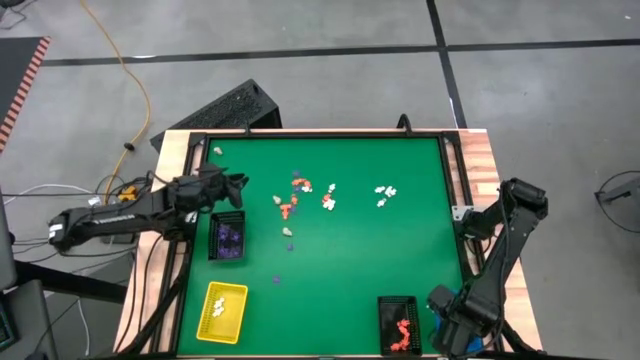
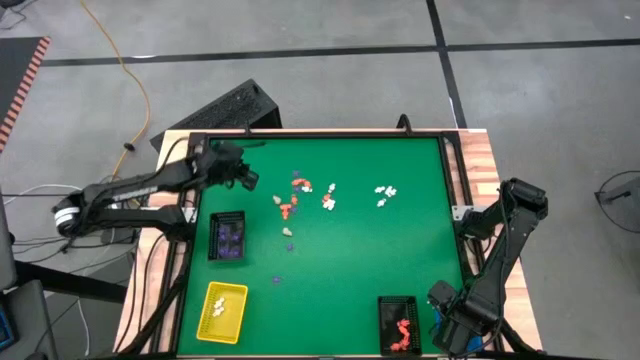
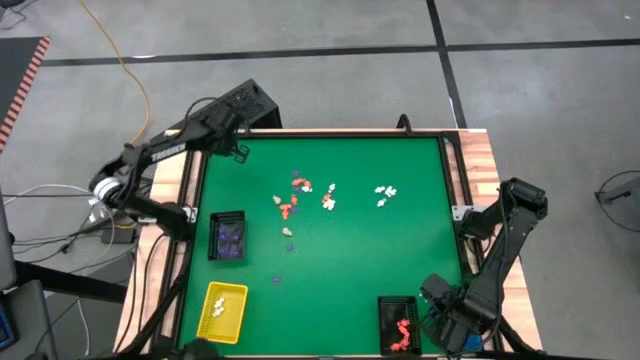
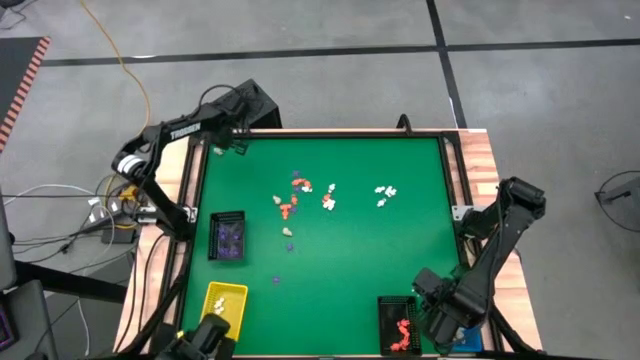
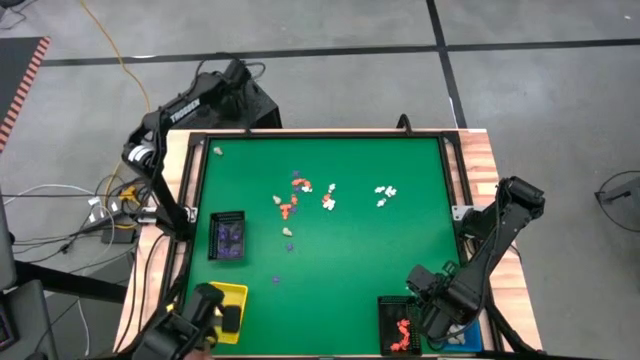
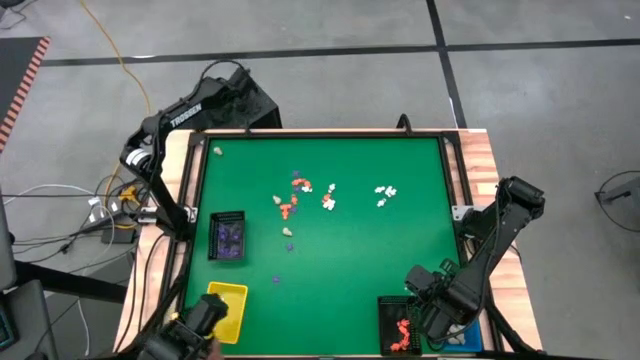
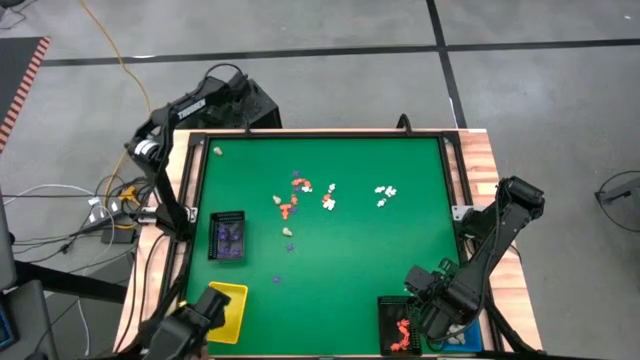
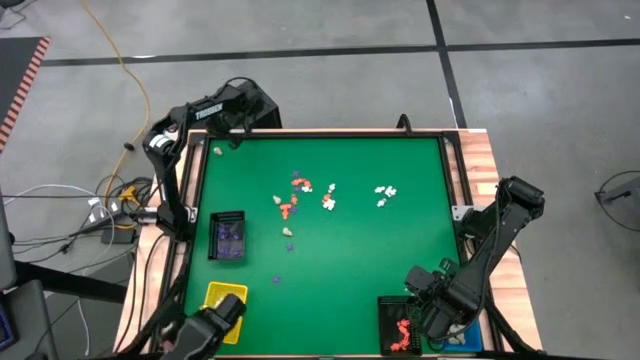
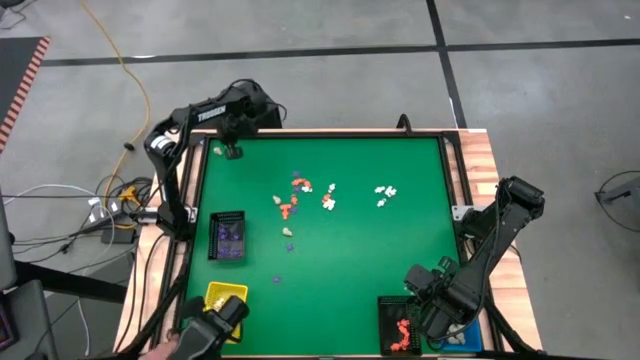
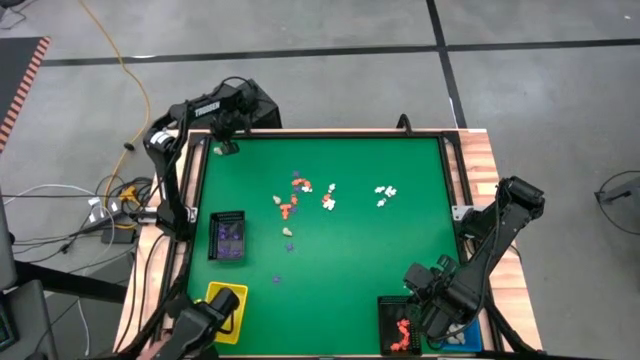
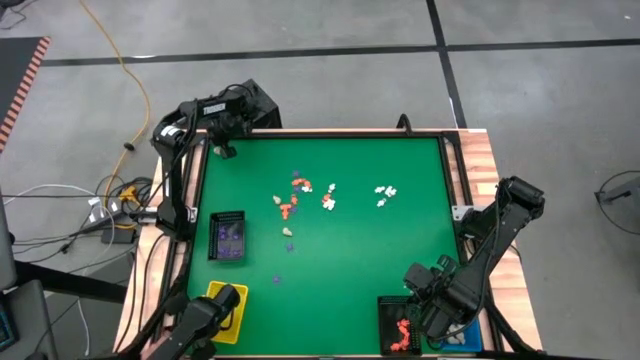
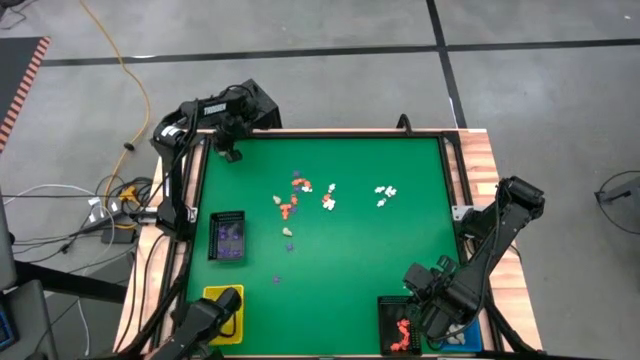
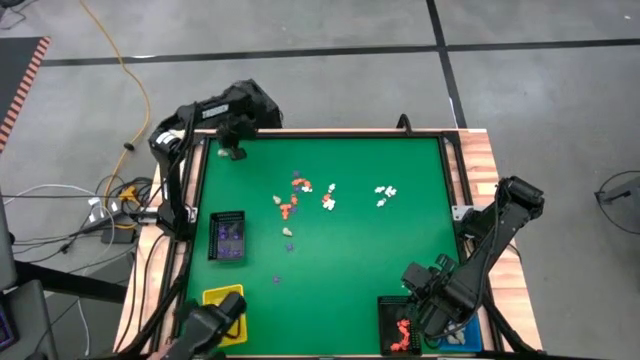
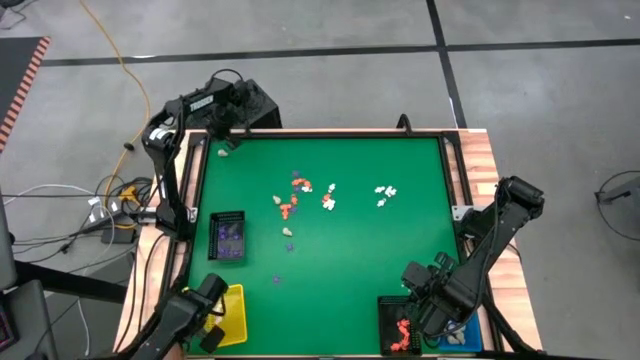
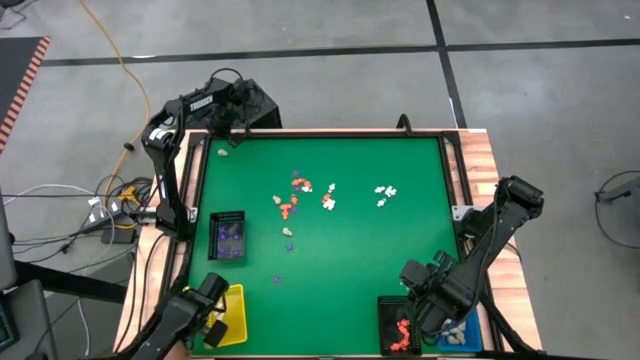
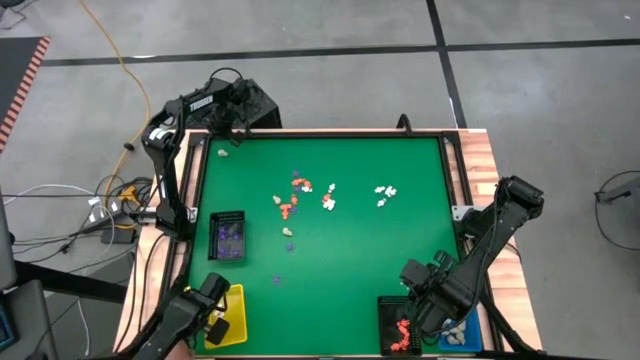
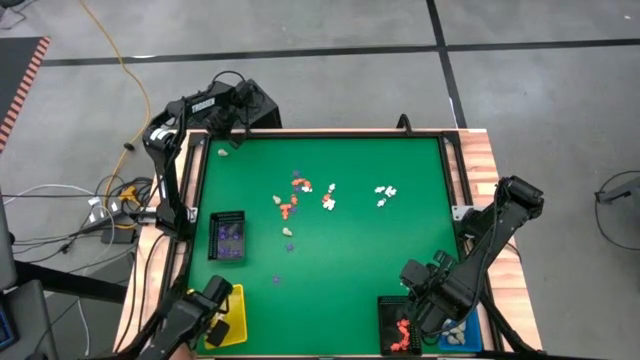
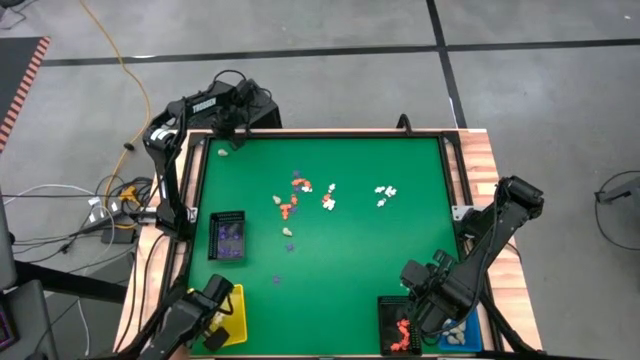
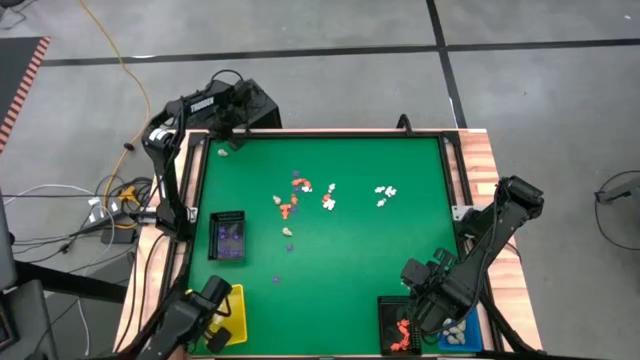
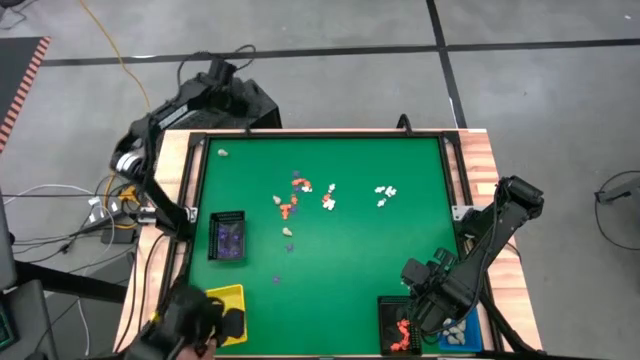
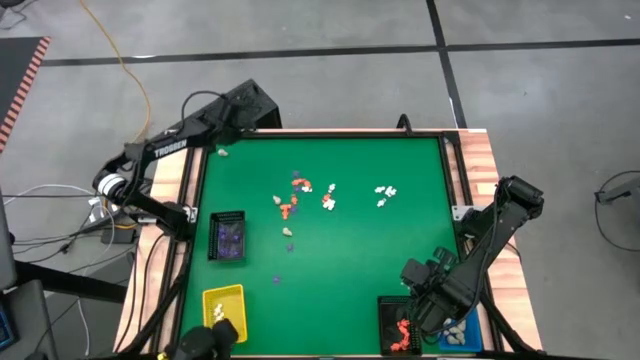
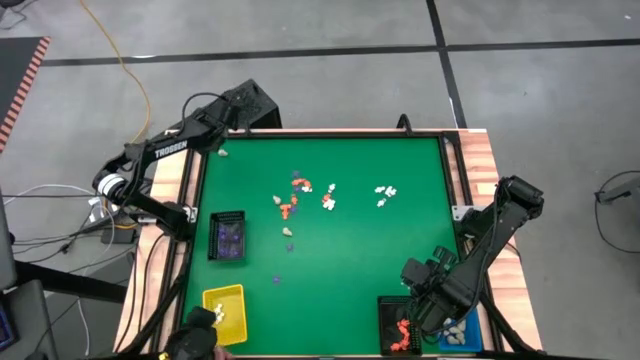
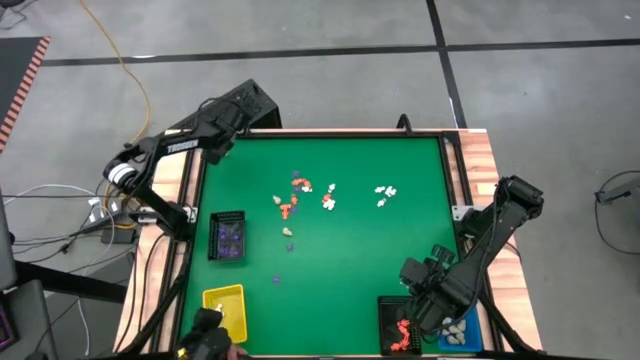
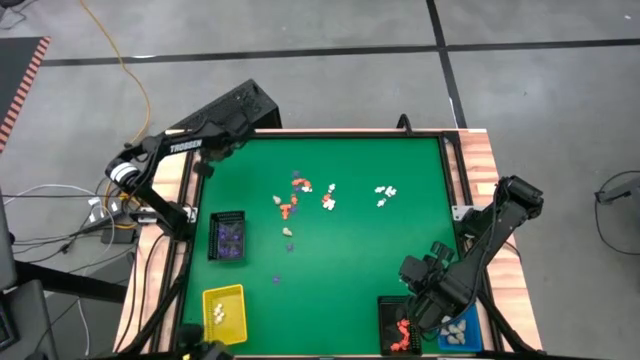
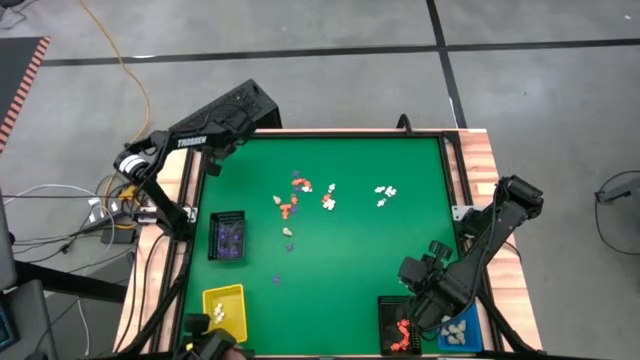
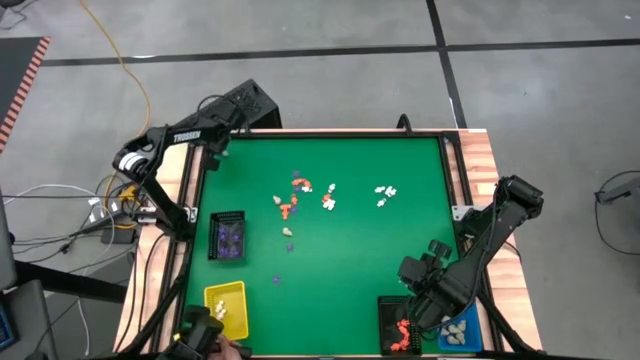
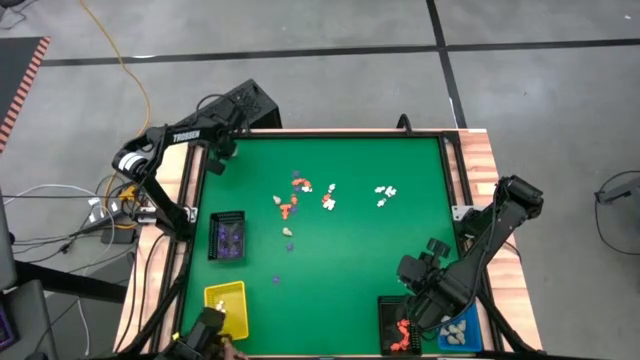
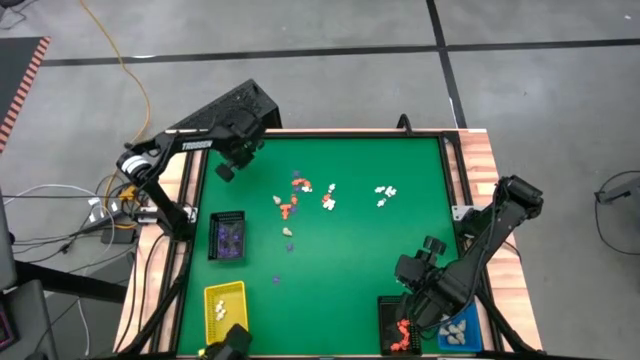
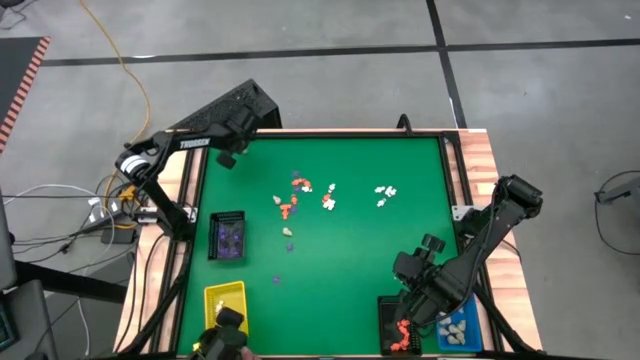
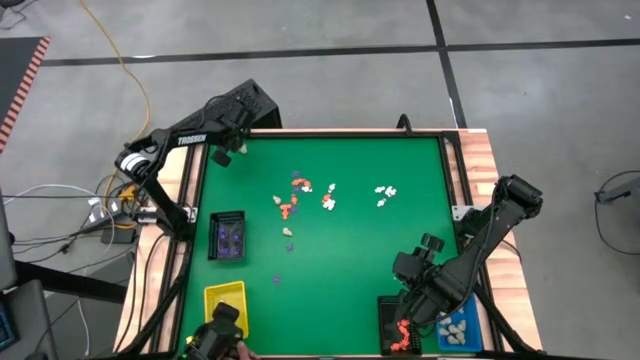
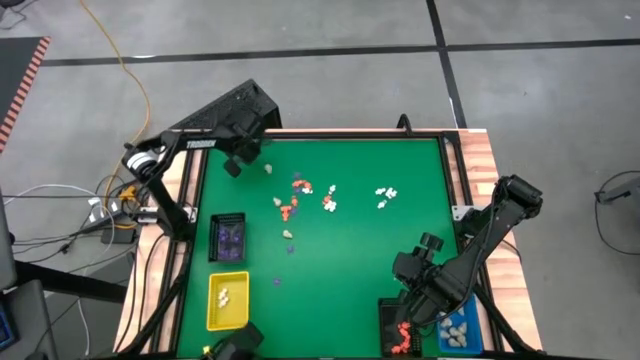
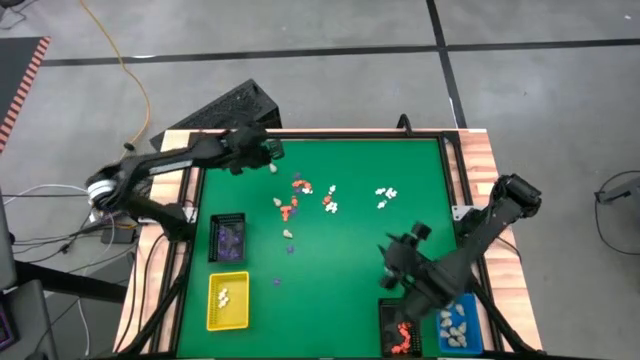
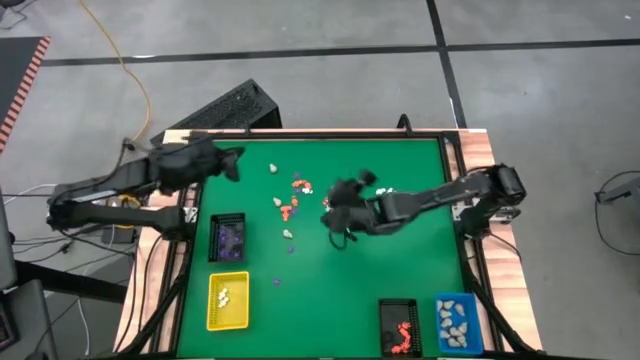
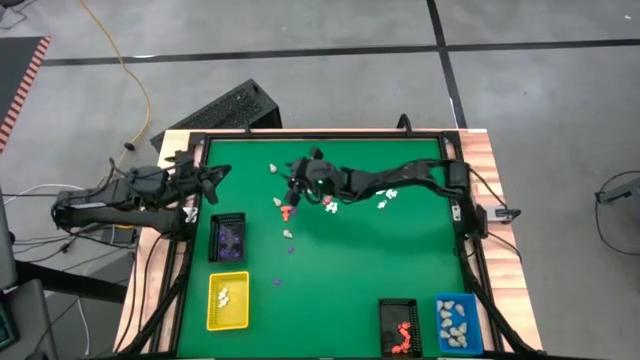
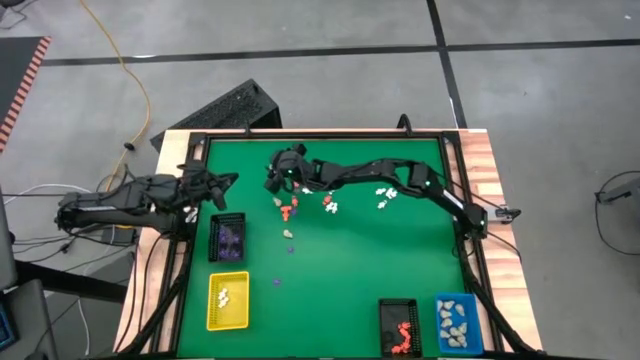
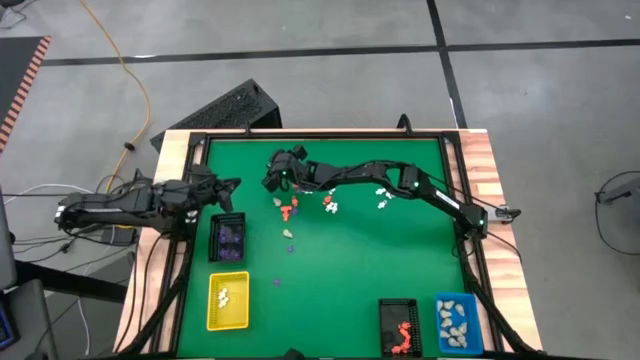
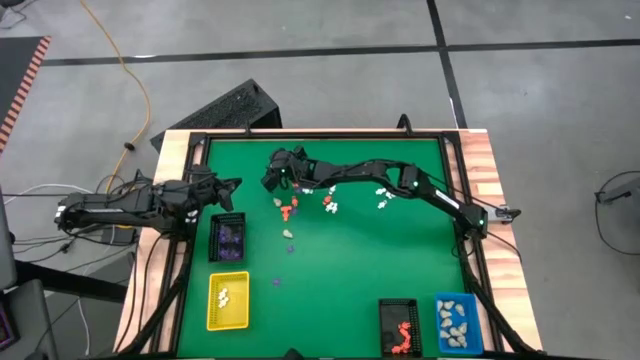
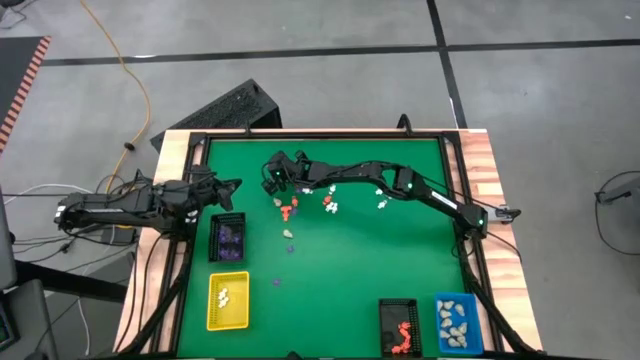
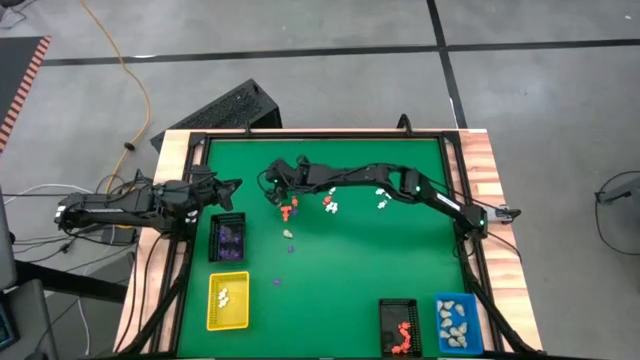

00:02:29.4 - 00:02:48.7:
Task: Sort Halloween decoration
Put the white skull toy into the blue basket

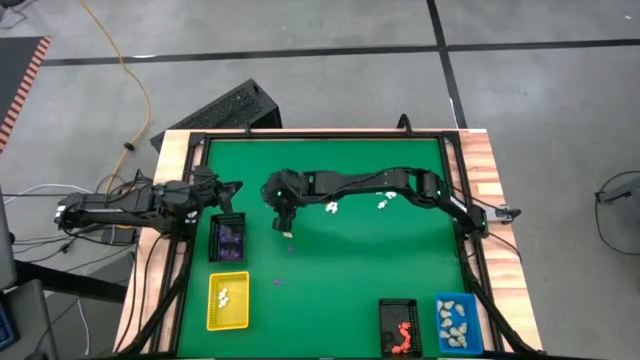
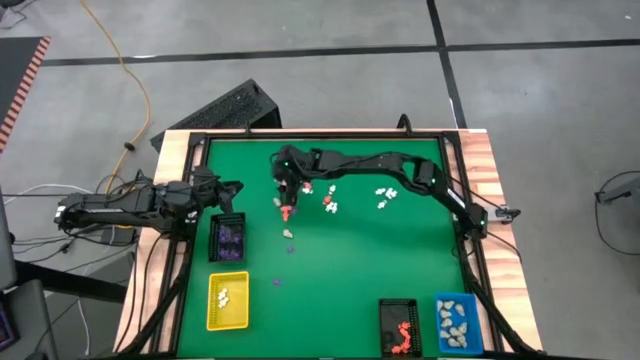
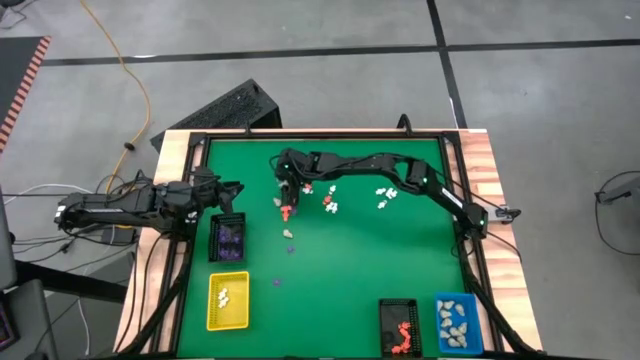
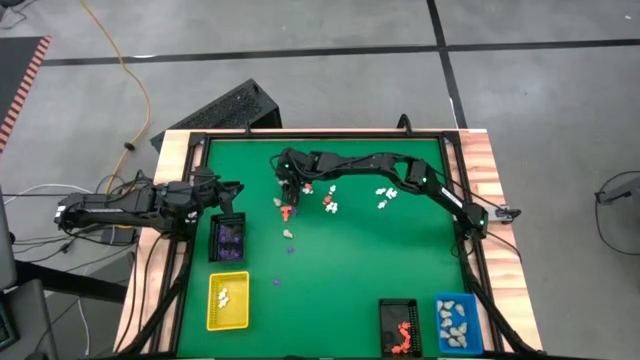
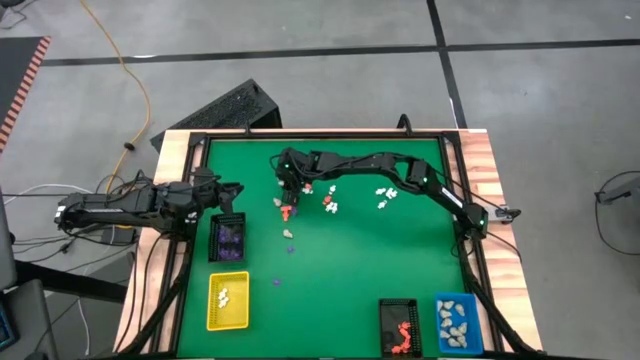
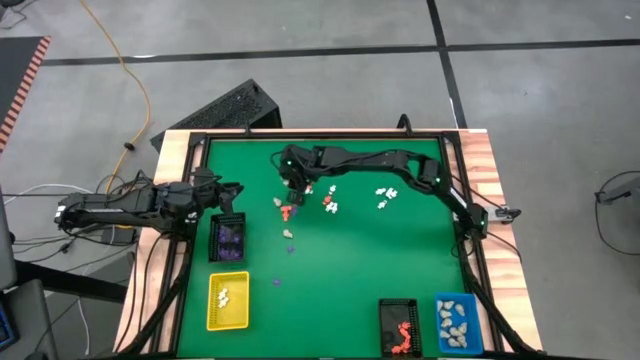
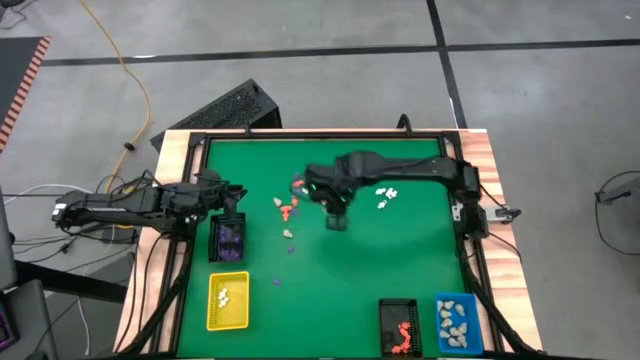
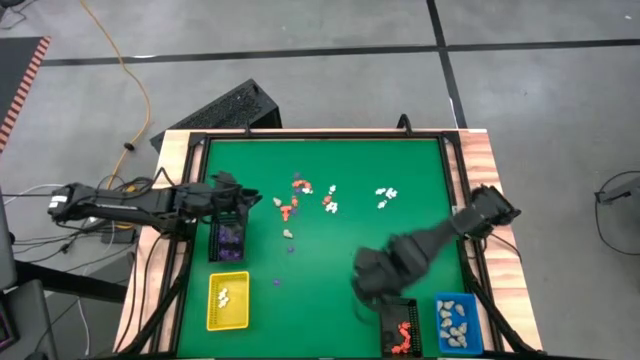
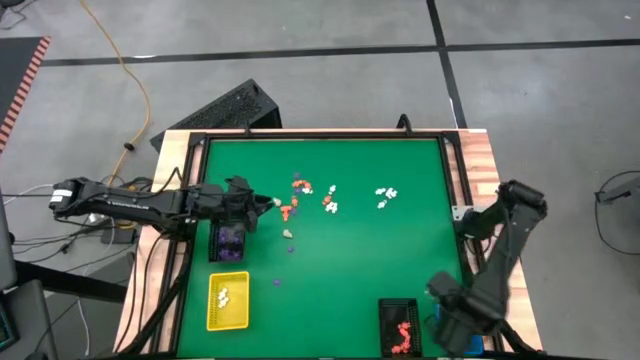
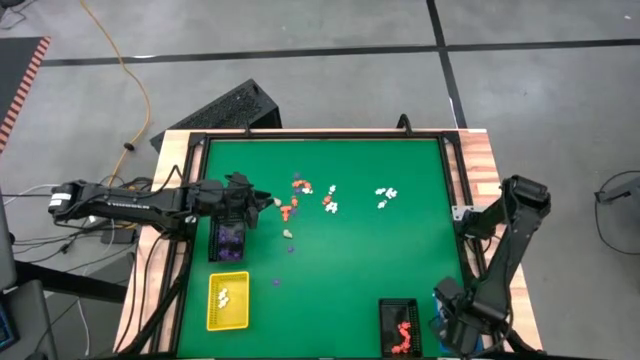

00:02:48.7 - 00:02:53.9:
Put the white skull toy into the blue basket
